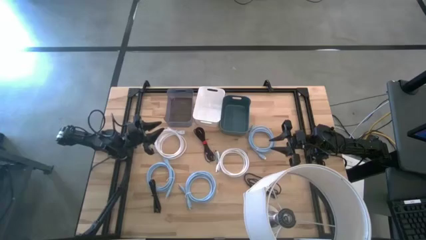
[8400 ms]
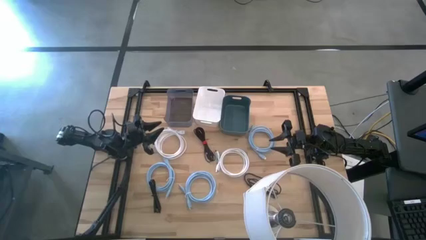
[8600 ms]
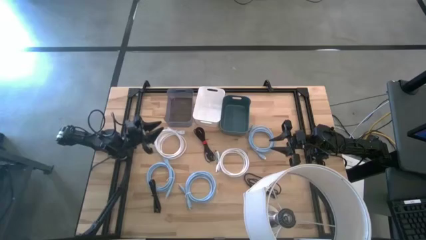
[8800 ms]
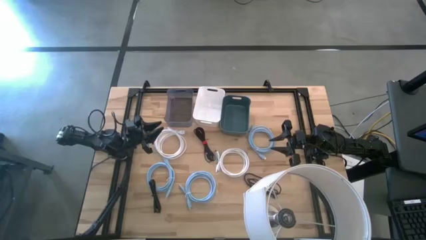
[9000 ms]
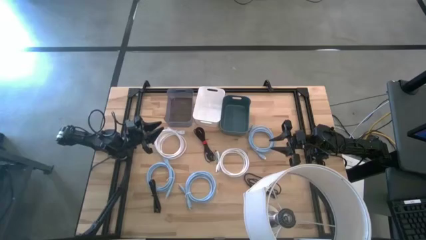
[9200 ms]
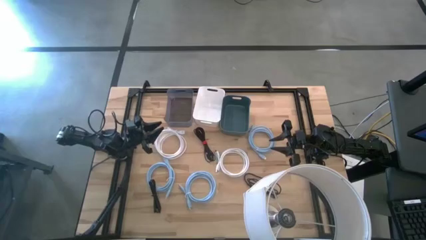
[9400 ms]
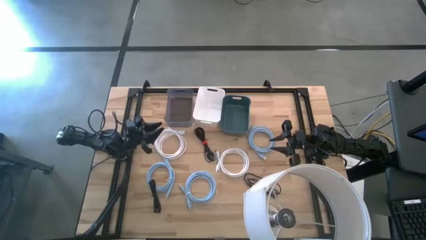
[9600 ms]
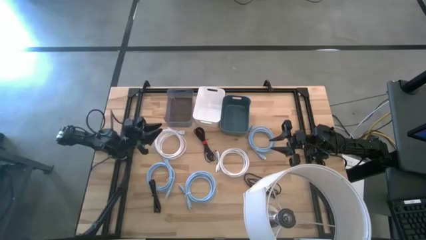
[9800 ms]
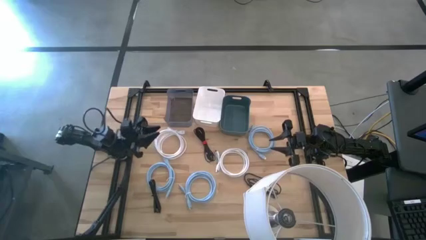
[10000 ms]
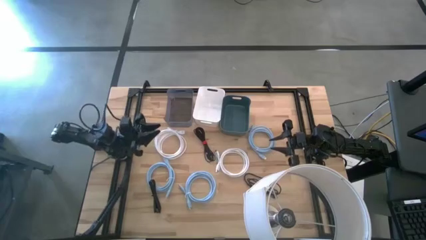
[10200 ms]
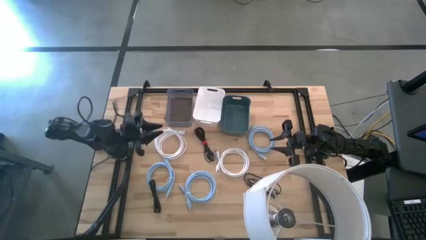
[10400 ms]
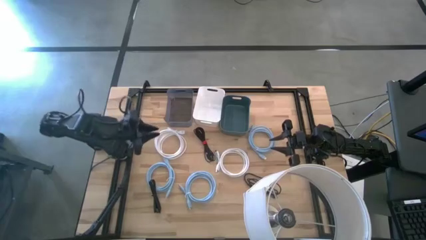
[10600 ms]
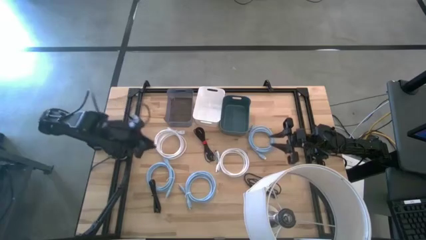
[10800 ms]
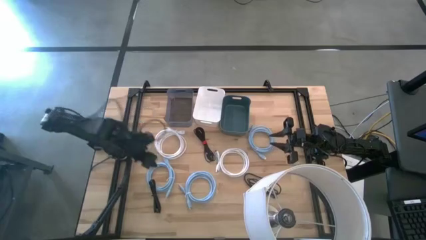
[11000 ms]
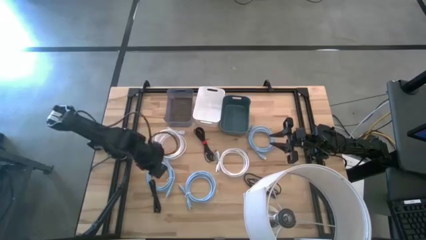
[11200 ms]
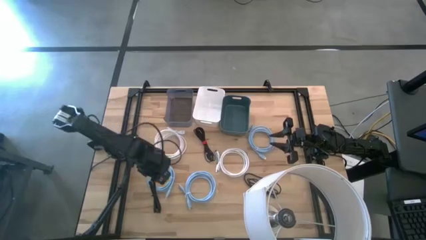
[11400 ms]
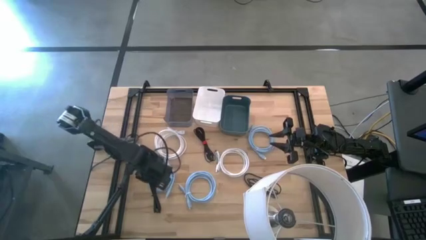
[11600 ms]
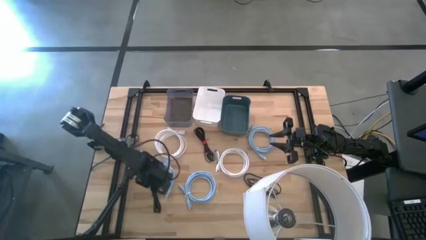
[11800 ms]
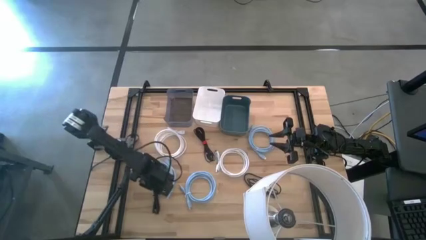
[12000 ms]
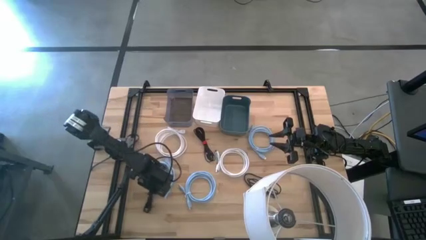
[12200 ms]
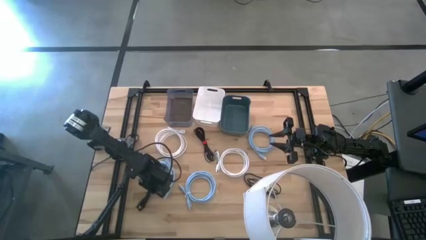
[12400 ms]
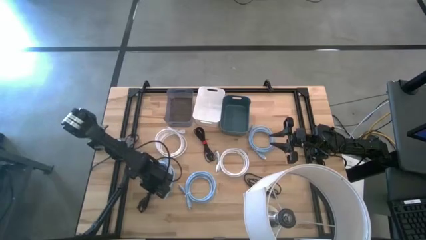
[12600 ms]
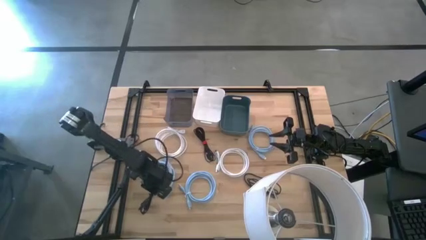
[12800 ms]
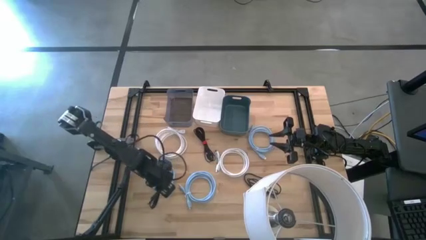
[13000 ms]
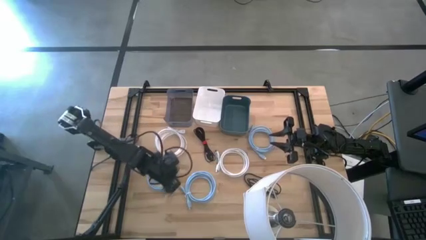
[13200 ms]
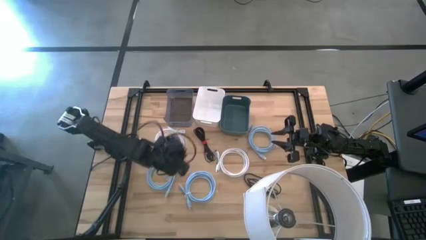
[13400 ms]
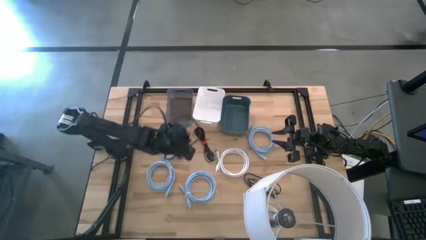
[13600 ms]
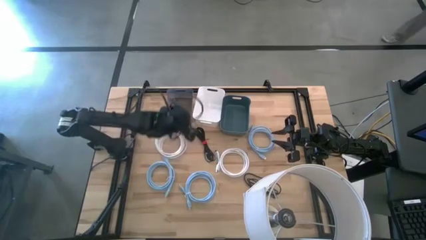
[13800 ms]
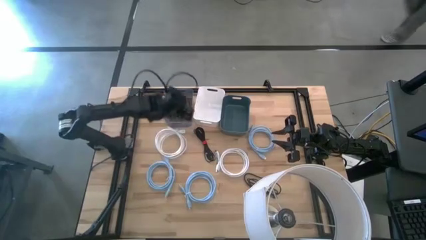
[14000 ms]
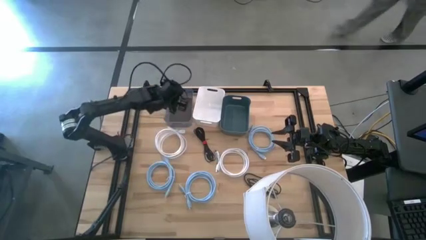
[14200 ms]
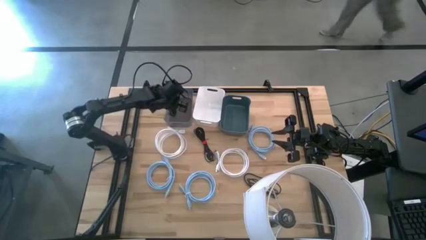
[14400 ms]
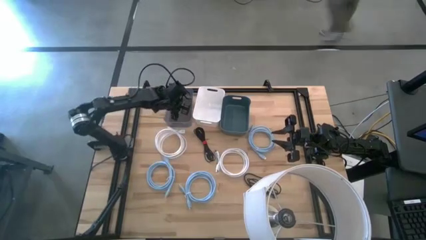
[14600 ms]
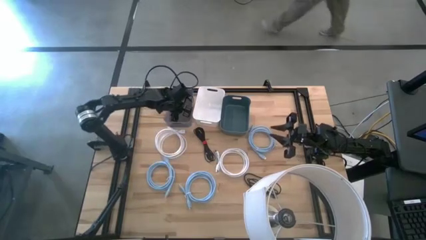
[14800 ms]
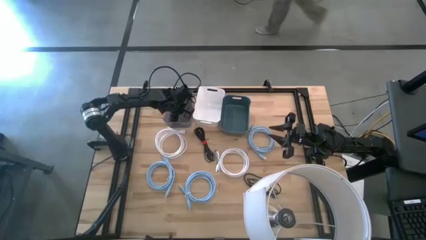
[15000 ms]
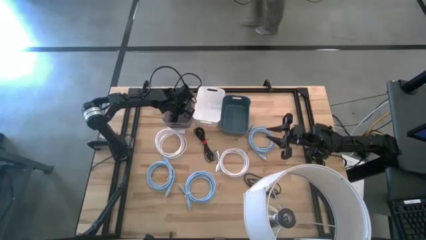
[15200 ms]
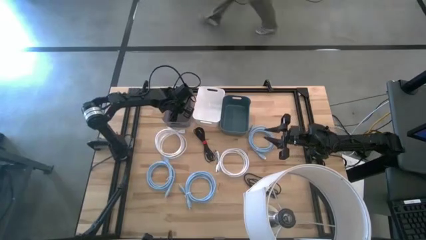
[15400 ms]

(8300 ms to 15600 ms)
Task: Pick & Place USB Port
Put the bottom left black USB cable into the black bin

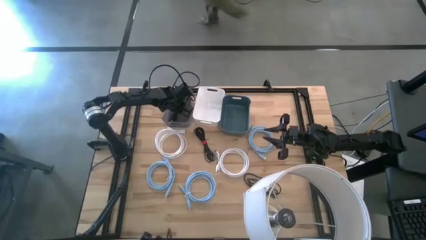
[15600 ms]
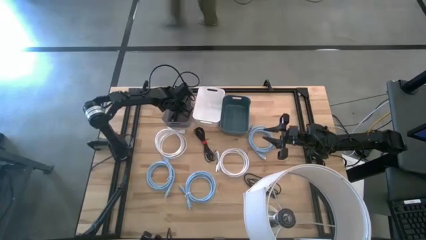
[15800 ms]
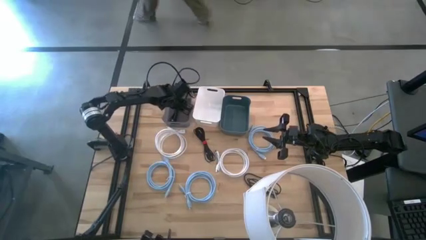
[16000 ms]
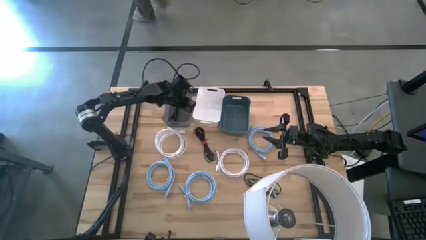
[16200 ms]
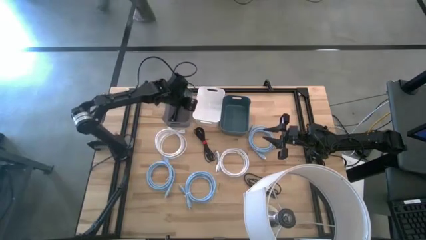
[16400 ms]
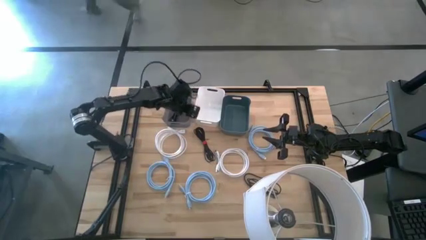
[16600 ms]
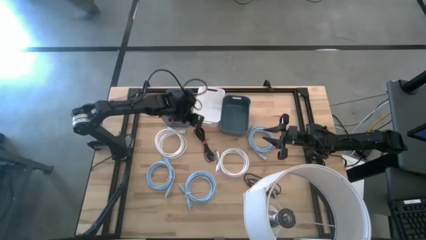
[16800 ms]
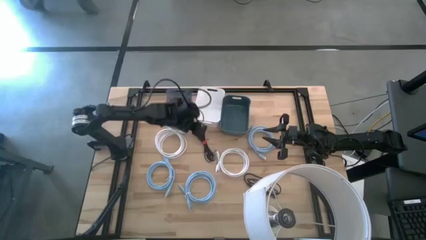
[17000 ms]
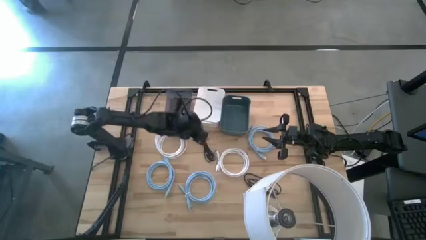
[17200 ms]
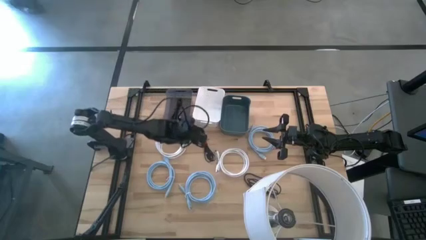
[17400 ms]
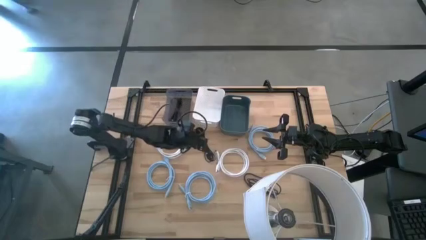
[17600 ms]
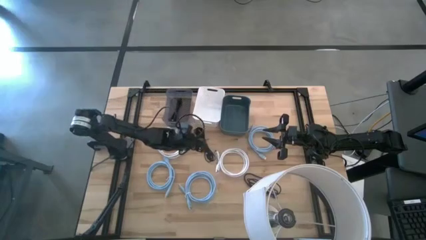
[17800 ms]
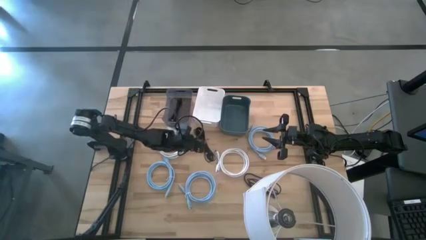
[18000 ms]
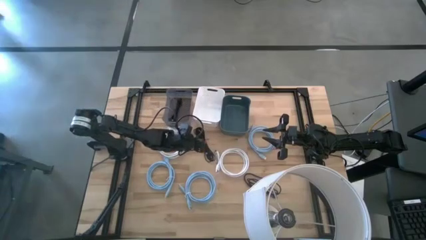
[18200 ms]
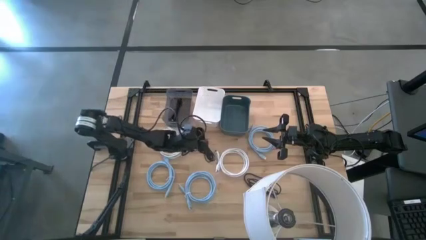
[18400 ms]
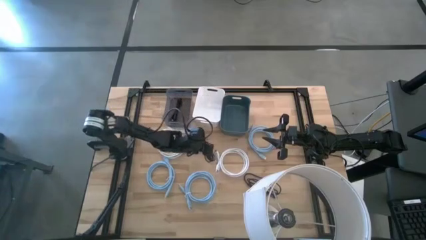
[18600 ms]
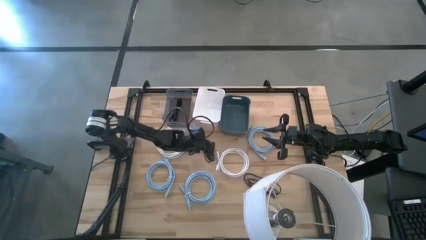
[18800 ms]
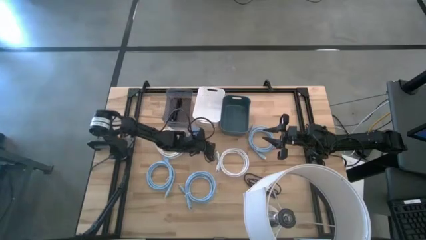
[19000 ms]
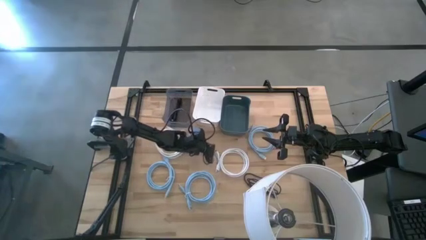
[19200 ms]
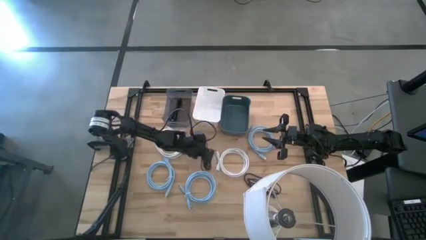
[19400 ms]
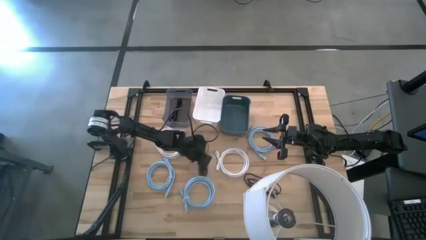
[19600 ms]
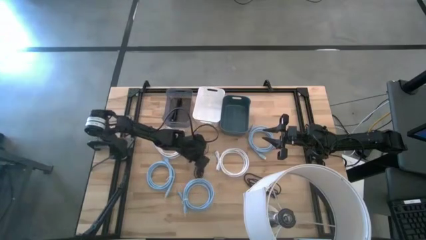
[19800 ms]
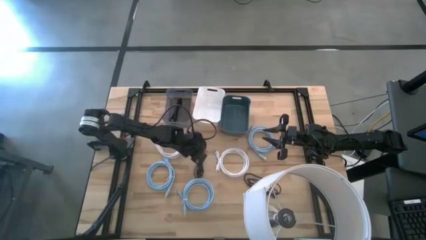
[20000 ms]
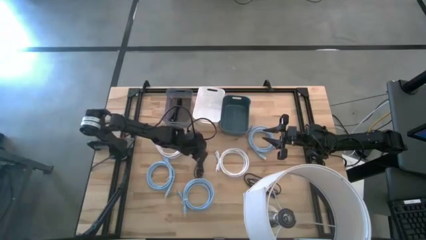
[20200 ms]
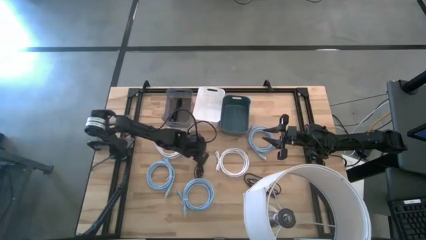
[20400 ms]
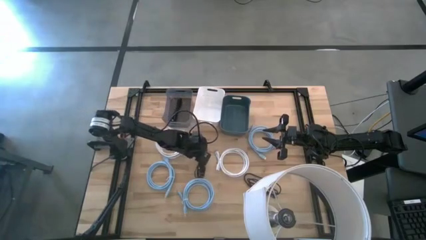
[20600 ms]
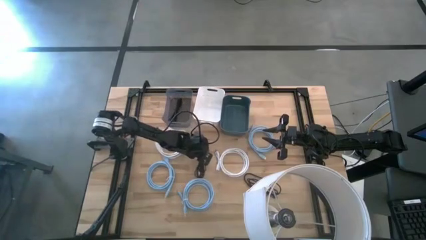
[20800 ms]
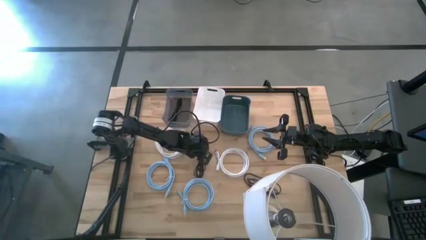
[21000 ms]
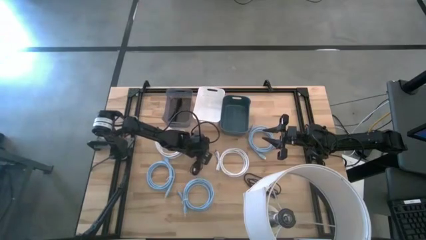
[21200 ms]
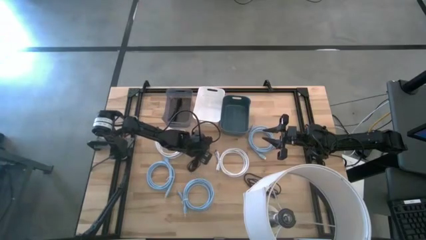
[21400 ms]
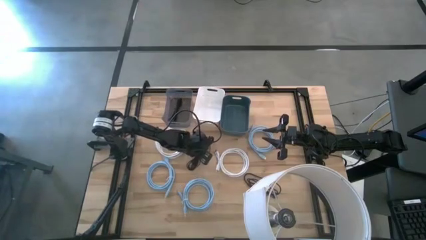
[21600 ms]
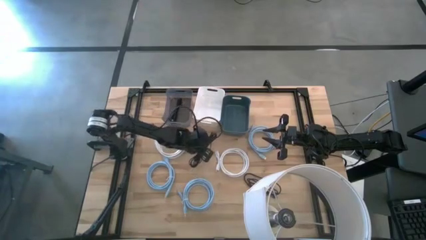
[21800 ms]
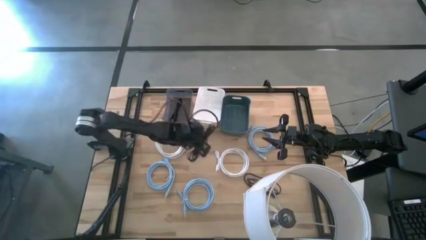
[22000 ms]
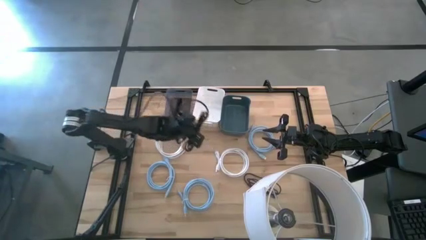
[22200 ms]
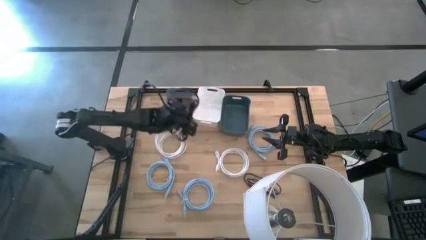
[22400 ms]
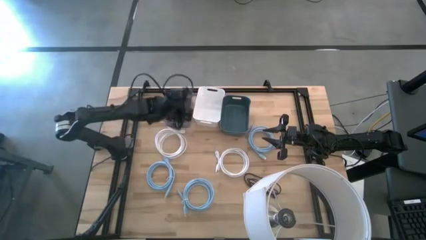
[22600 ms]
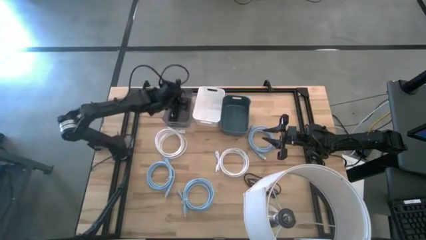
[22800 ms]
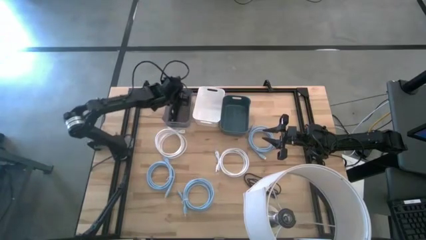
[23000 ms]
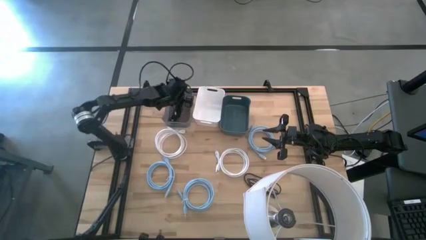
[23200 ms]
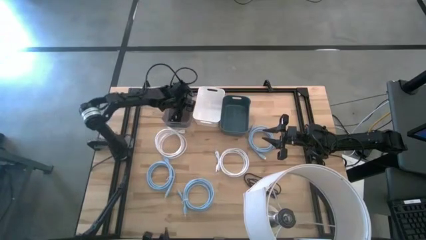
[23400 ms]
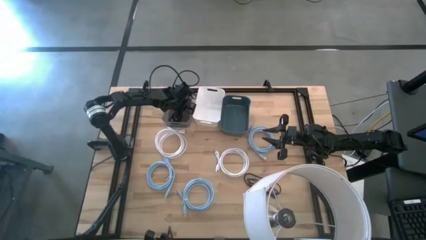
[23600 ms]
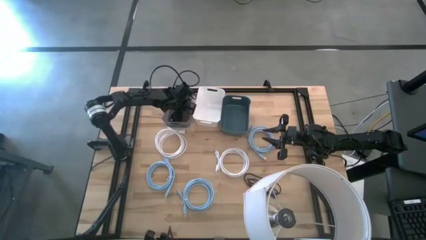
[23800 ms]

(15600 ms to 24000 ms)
Put the top black USB cable into the black bin

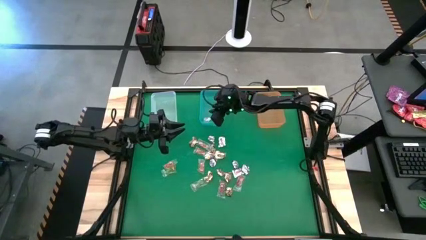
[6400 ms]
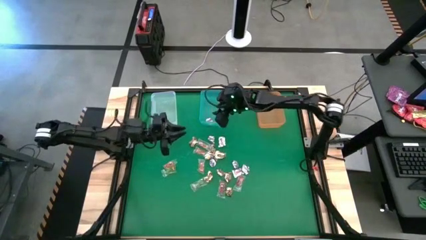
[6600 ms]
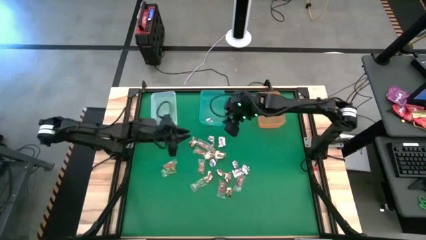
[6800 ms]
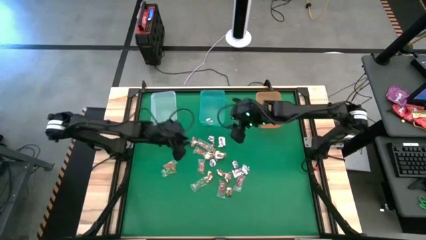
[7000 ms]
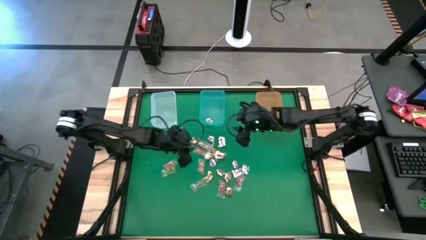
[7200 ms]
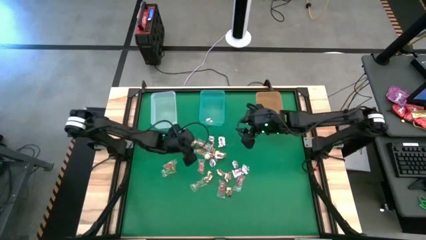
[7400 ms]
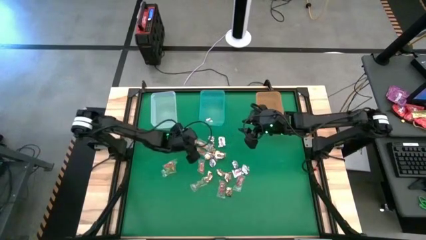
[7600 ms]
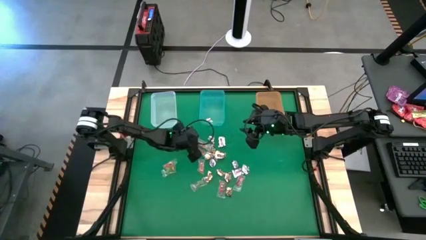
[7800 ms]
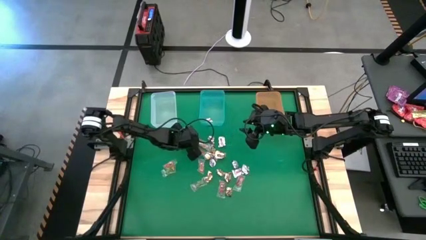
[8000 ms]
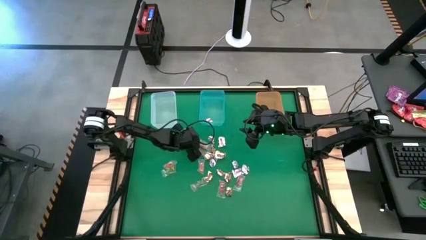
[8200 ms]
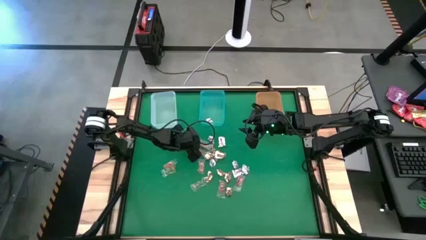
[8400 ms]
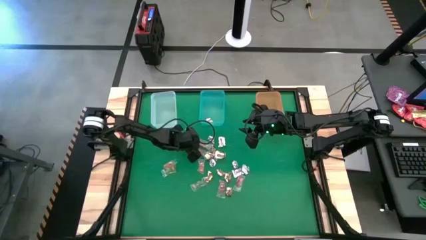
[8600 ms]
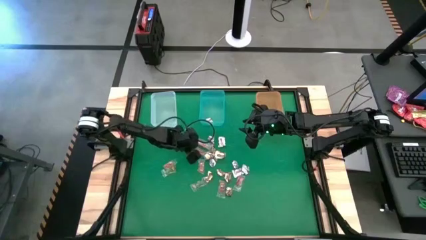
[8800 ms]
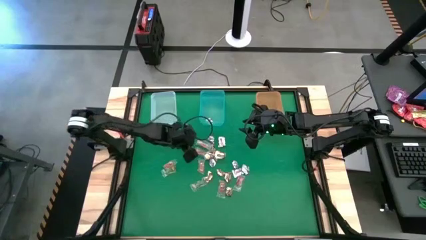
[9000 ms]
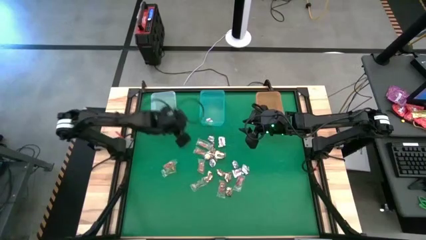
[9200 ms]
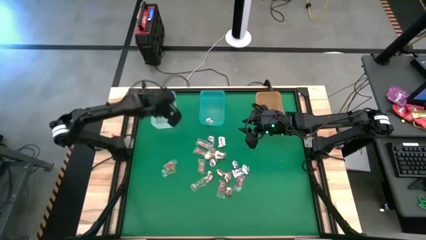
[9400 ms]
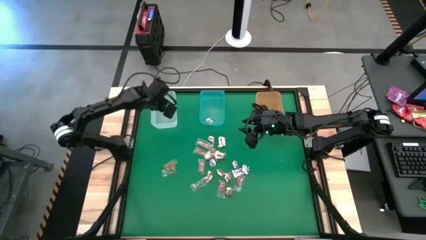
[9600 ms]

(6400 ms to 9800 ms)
Task: Sort candy by brand, put in halloween buckets
Put the gold wrap candy into the white bin
